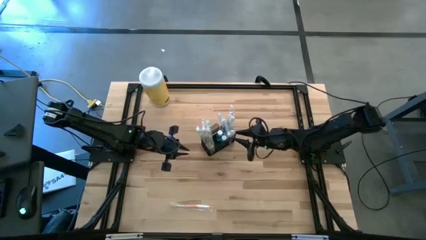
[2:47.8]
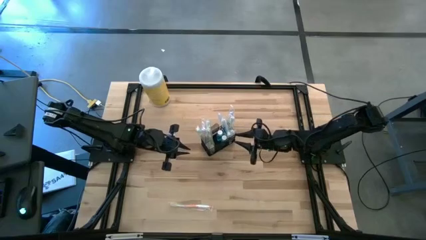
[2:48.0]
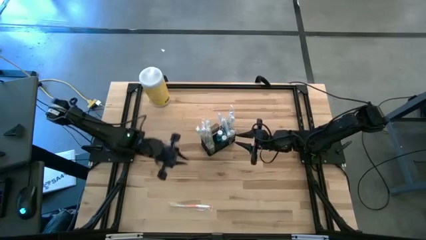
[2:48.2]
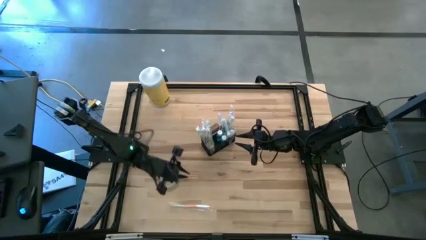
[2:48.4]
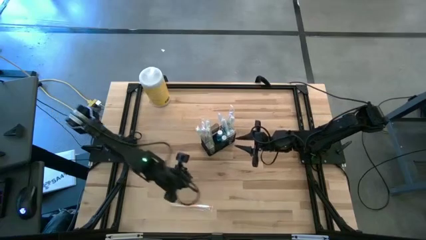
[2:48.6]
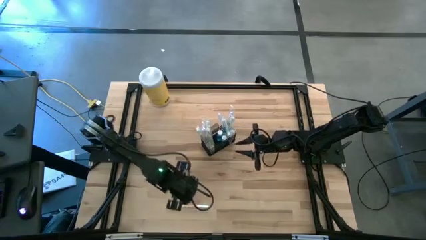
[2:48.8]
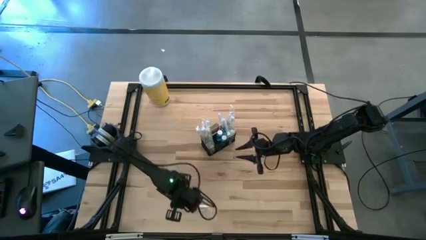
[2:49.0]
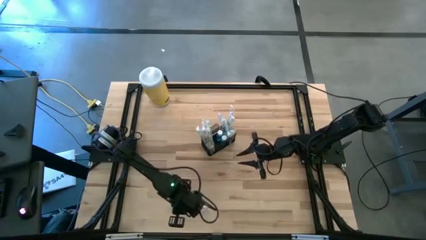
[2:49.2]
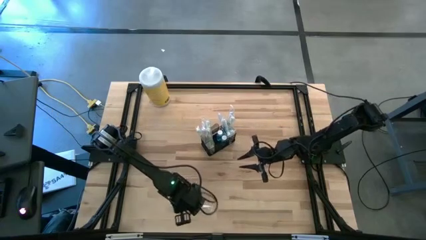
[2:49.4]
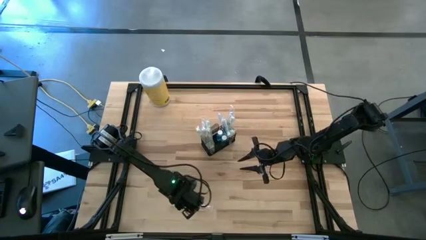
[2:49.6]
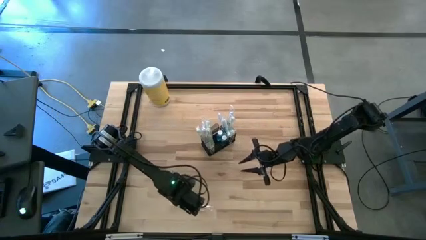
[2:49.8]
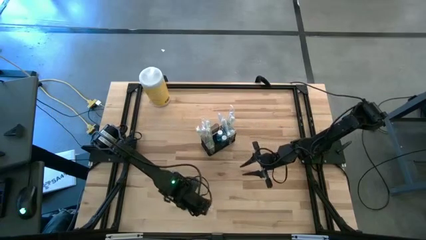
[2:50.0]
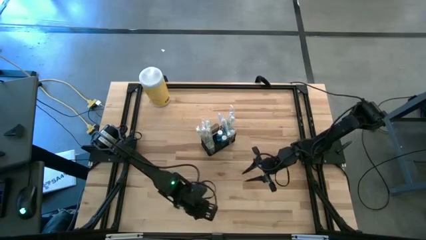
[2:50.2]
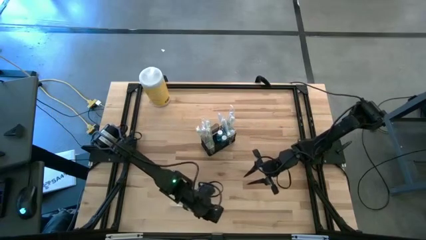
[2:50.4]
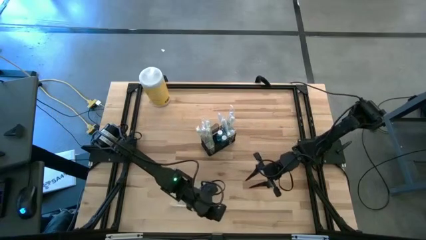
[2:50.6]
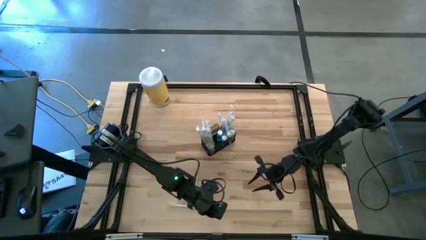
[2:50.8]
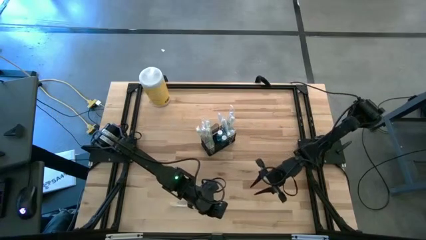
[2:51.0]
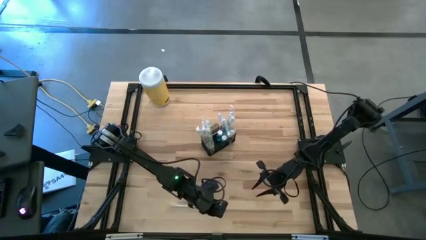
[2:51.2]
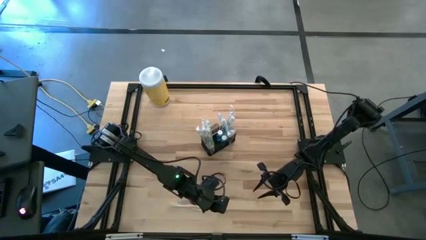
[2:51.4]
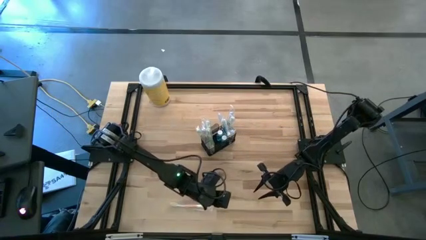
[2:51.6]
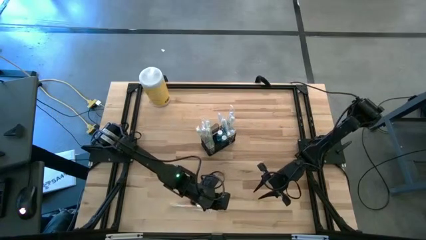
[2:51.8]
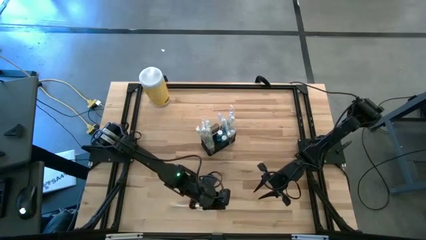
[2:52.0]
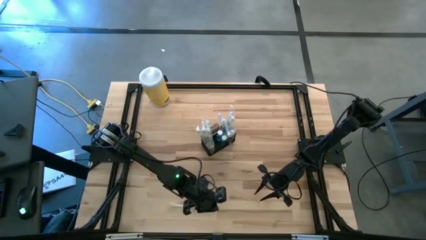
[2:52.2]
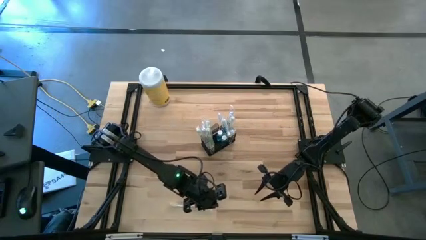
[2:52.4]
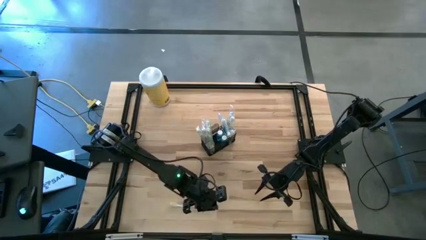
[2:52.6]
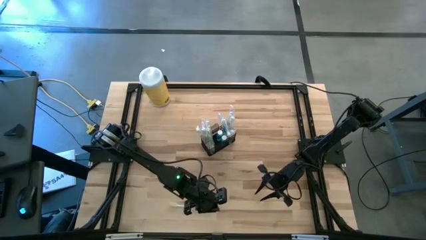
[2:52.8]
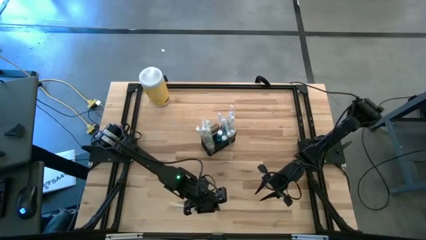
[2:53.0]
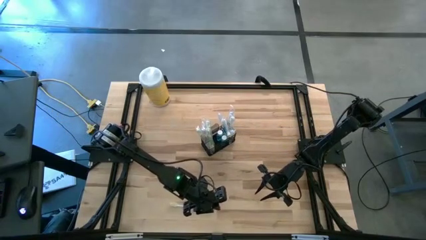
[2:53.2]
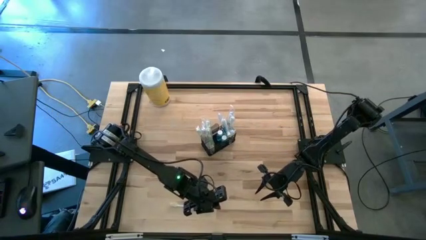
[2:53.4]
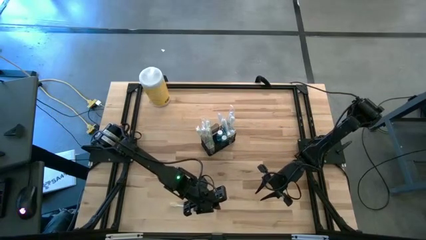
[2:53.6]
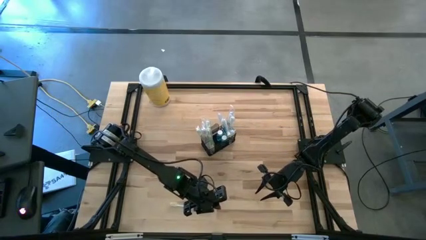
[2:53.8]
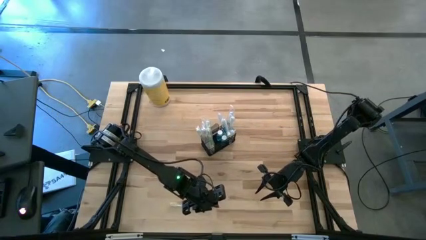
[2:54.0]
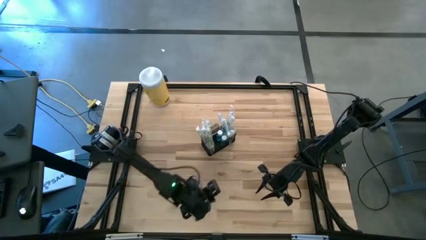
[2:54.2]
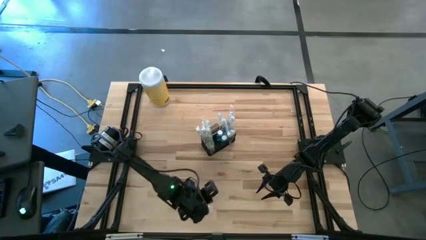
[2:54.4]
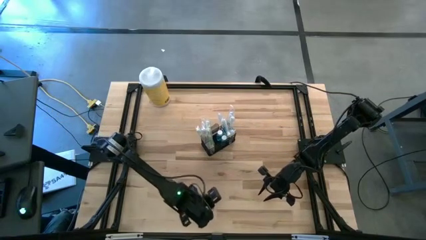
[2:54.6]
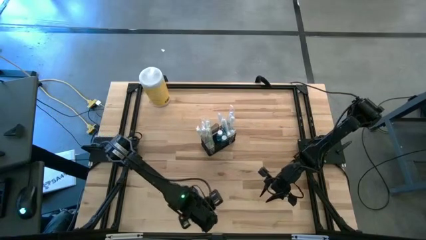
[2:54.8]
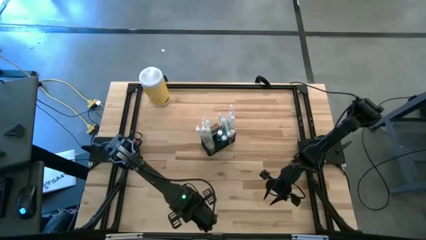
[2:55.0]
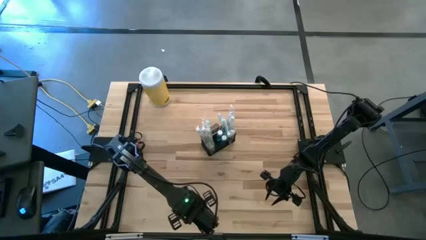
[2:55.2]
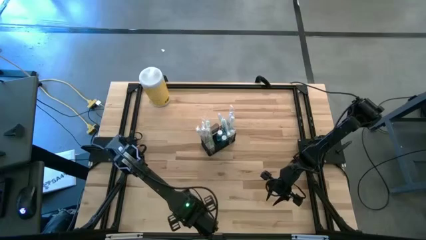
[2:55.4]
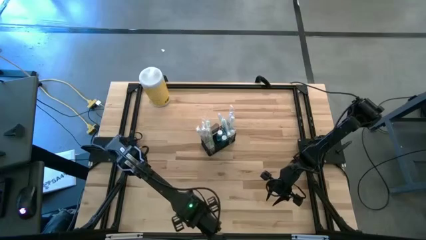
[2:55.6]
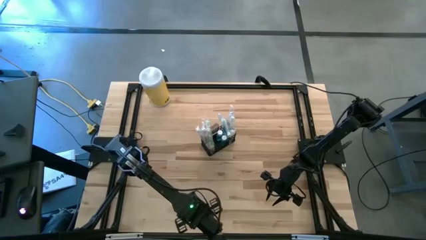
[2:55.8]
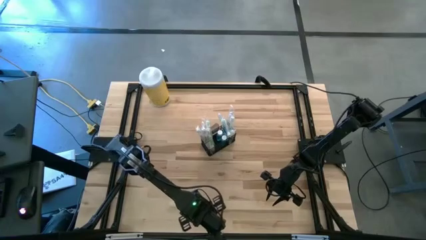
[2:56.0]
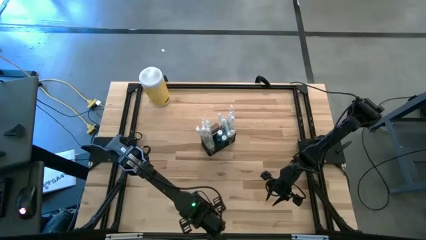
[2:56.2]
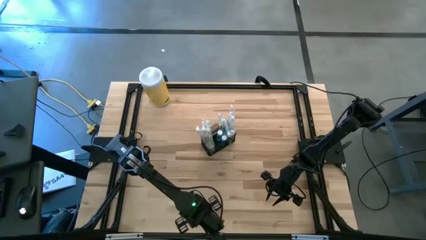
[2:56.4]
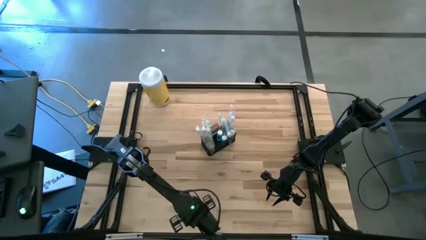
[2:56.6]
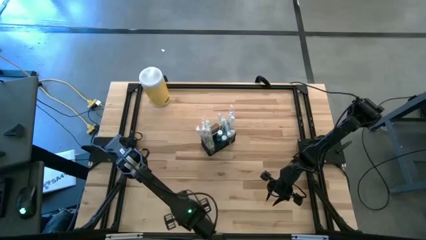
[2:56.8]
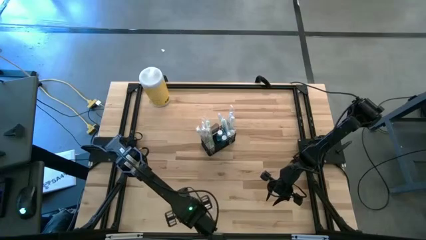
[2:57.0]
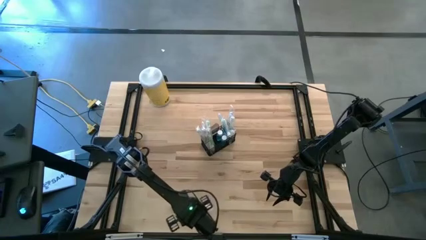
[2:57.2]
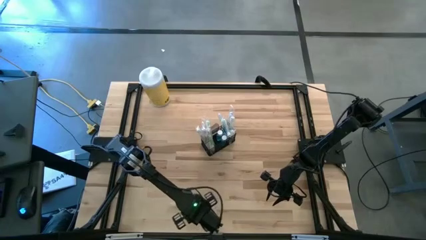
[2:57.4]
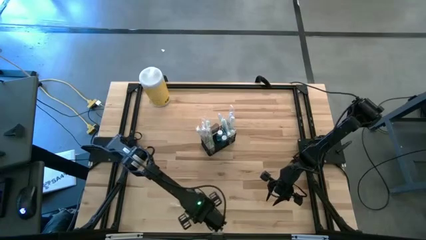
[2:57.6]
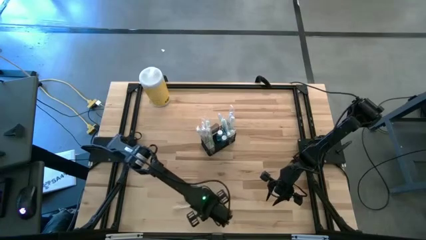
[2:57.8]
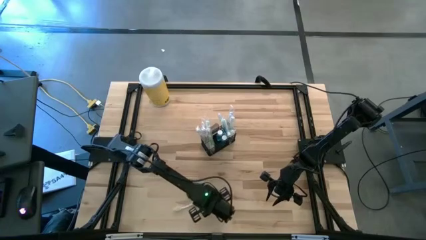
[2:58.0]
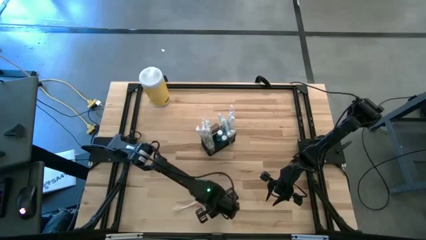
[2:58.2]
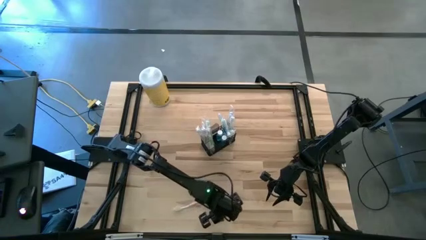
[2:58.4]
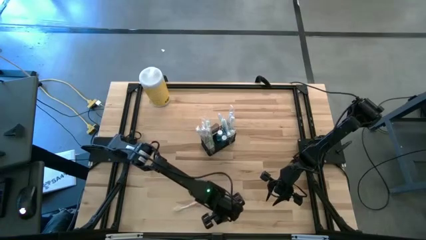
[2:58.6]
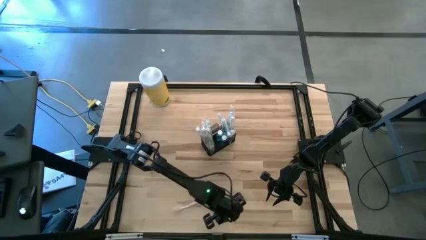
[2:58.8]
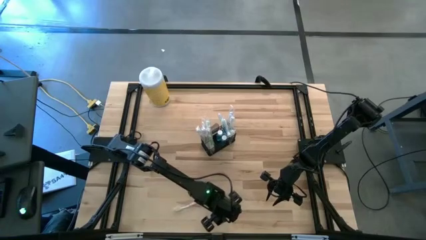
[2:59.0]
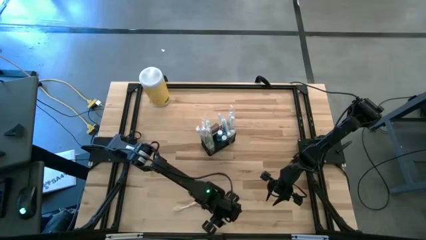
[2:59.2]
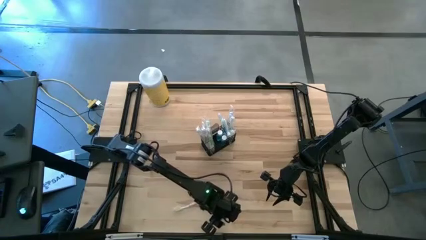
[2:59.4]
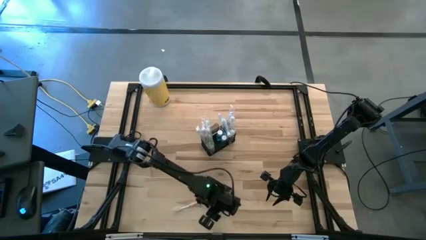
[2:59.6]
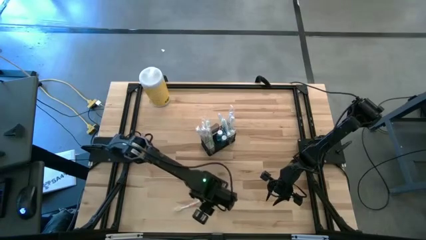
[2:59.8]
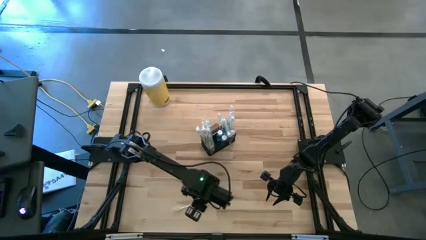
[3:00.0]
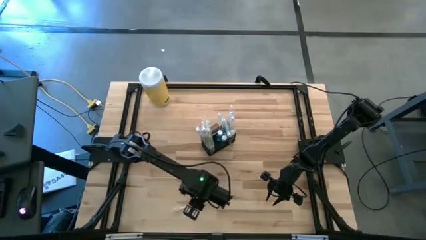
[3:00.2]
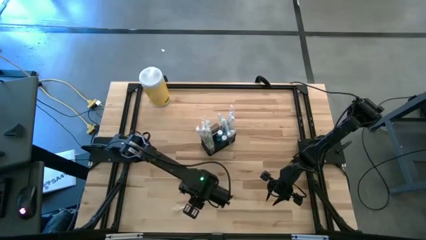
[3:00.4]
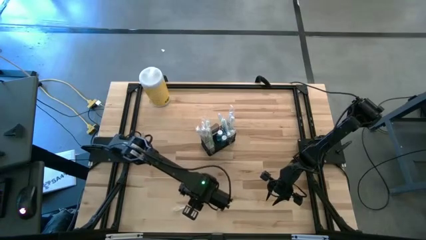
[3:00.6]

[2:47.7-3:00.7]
Task: Pick & Place toothbrushing station
Put the orange toothbrush into the wire organizer

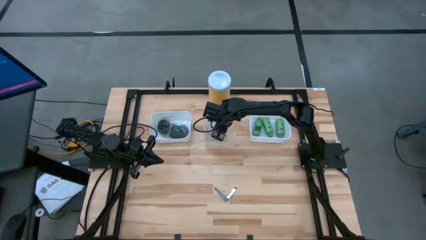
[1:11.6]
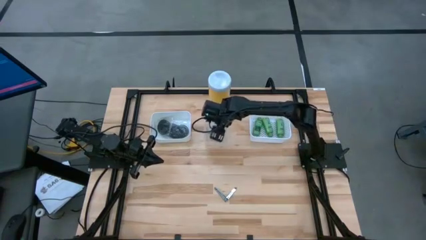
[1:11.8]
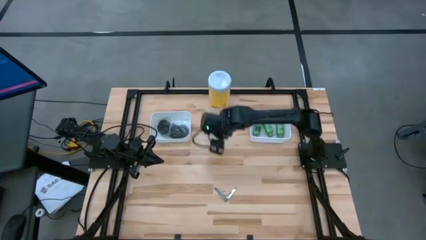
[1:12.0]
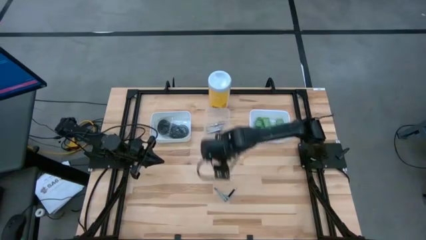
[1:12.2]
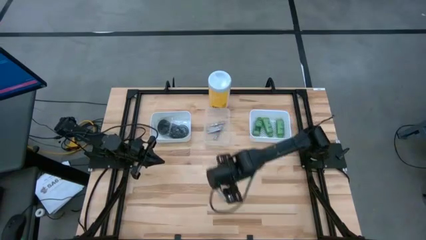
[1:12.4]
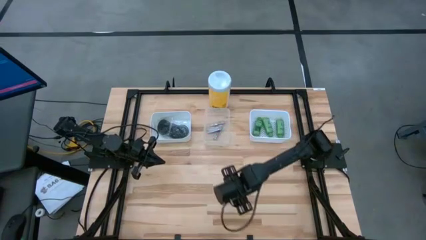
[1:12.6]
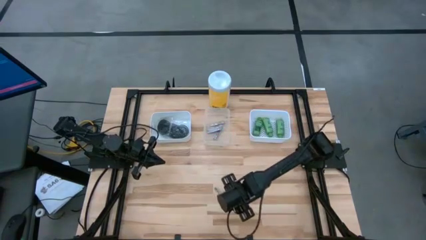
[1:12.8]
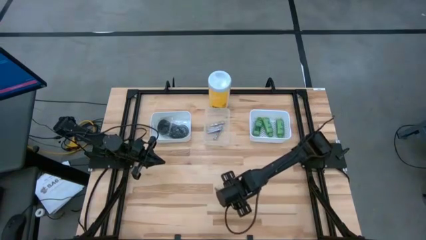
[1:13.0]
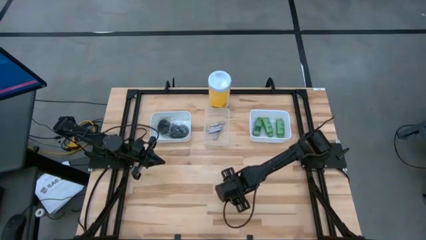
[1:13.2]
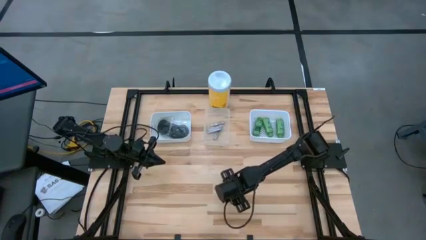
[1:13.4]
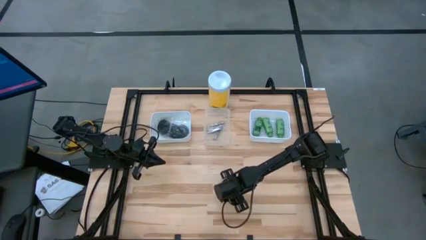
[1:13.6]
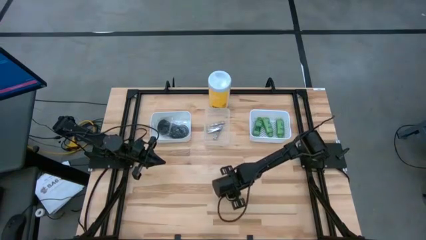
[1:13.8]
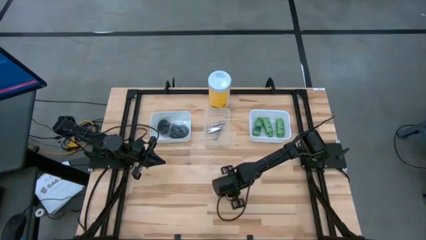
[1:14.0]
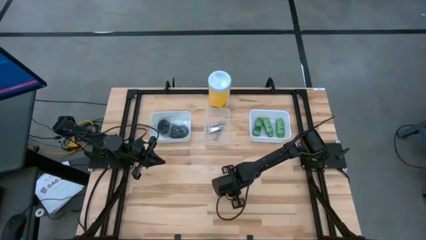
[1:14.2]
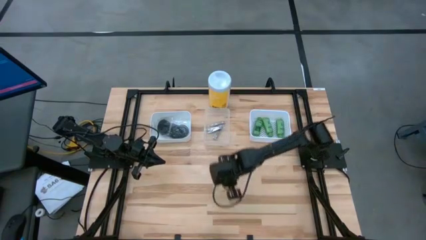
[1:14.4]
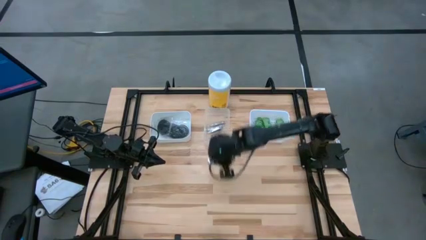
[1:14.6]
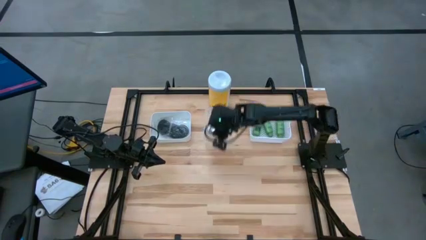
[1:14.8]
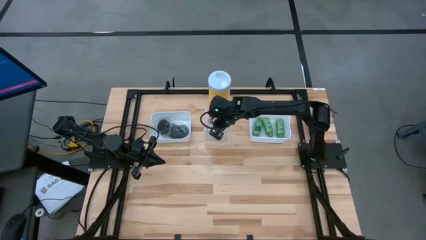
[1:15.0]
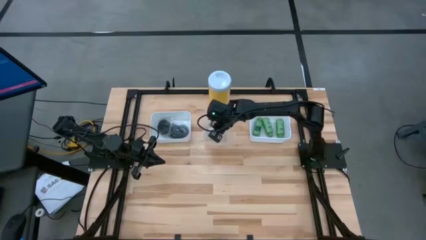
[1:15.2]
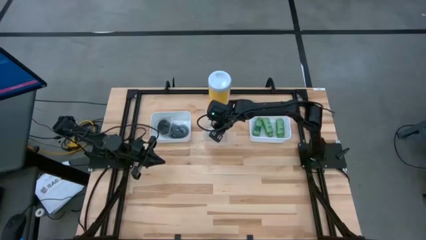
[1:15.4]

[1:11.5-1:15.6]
Task: Pick & Place Travel size toiletries
Put the silver nail cutter into the transparent bin

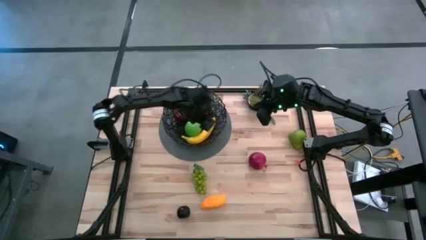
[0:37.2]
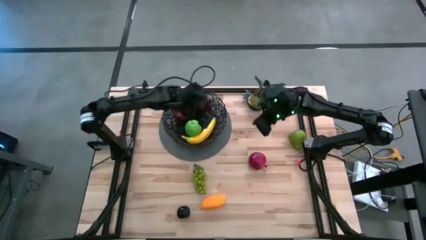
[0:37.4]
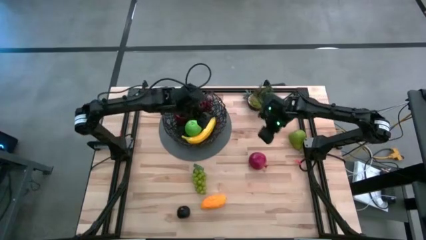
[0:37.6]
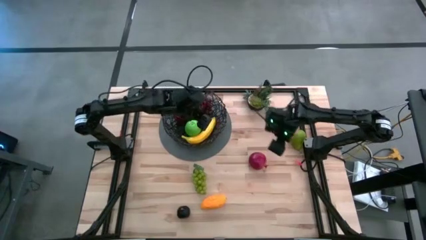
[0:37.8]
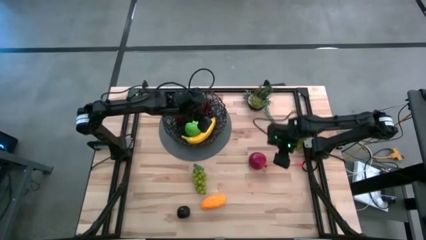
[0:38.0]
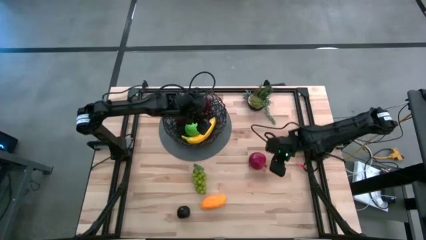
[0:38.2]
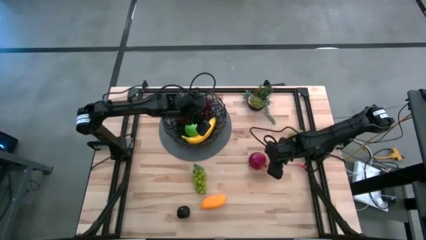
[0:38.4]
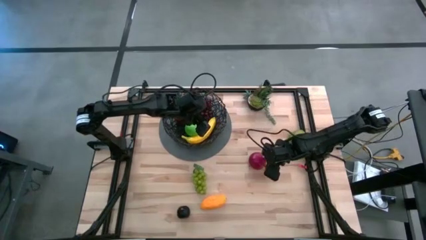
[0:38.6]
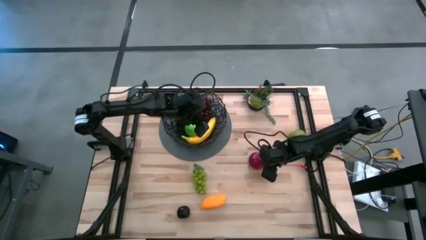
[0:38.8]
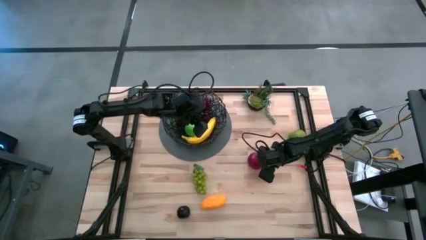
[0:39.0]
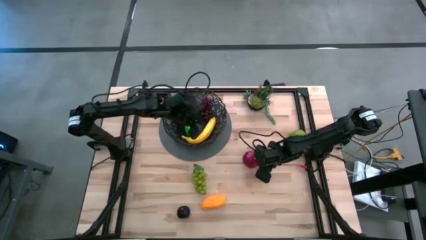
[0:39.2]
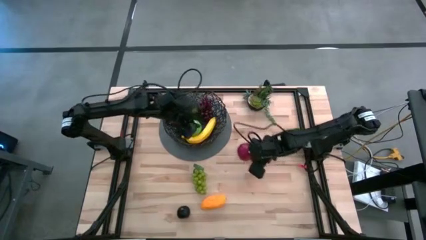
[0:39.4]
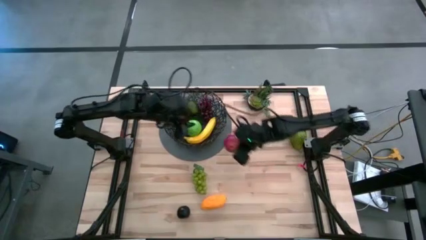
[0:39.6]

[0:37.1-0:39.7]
Task: Build produce basket
Put the red pomegranate into the black wire basket
